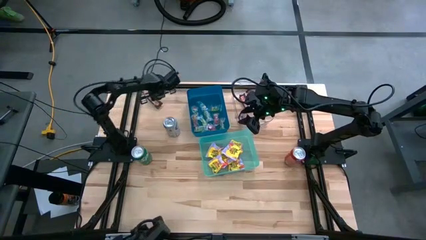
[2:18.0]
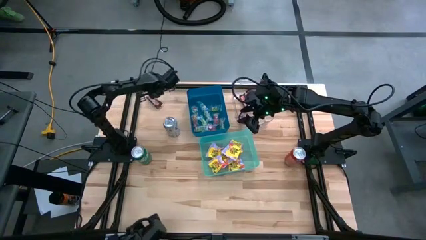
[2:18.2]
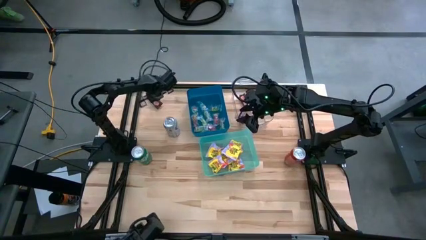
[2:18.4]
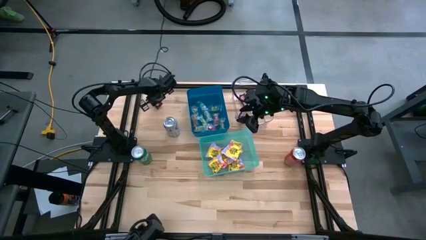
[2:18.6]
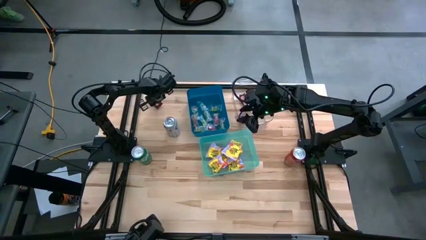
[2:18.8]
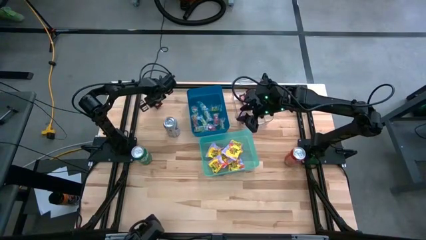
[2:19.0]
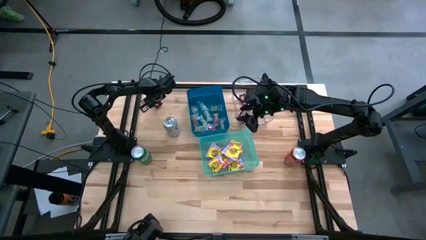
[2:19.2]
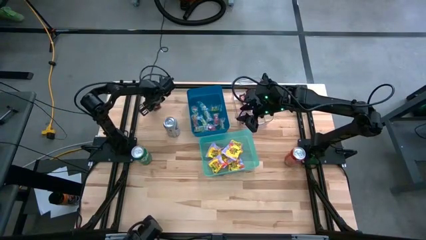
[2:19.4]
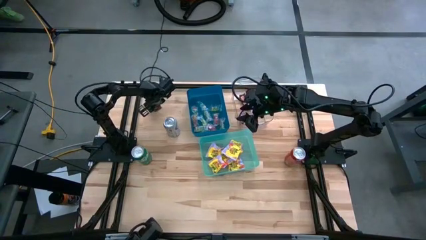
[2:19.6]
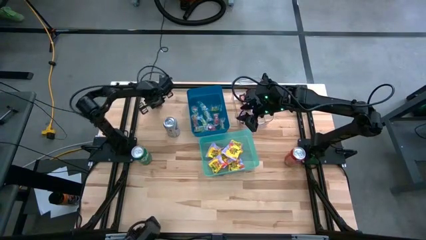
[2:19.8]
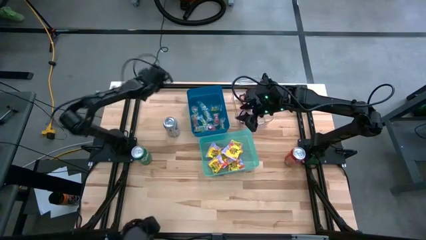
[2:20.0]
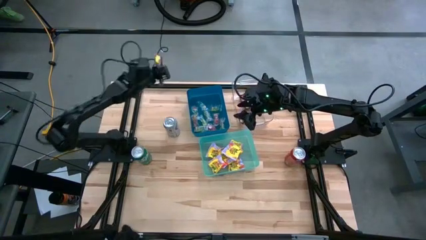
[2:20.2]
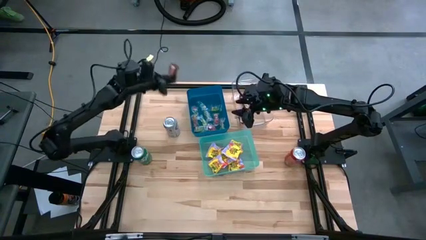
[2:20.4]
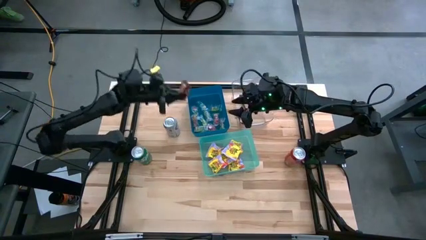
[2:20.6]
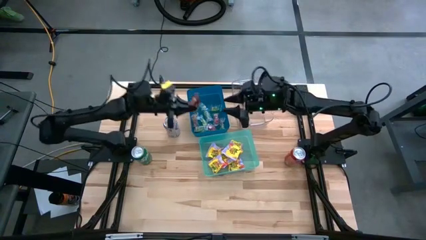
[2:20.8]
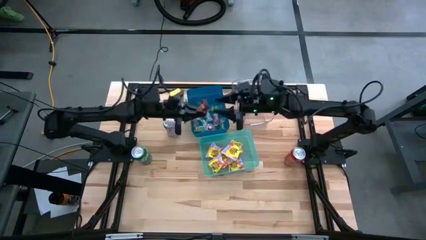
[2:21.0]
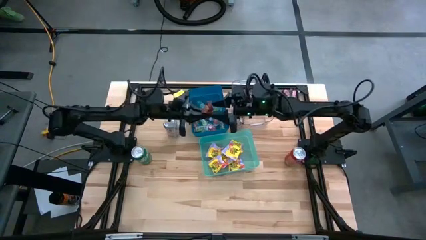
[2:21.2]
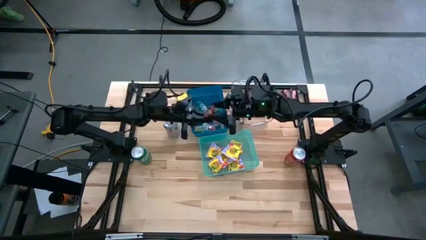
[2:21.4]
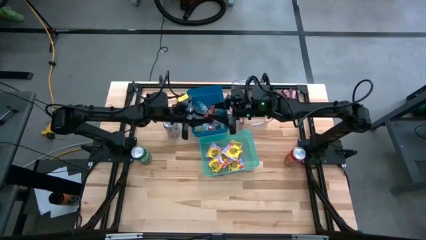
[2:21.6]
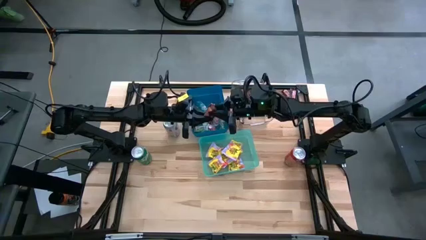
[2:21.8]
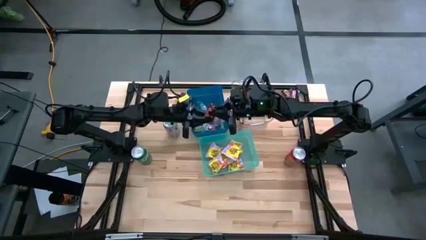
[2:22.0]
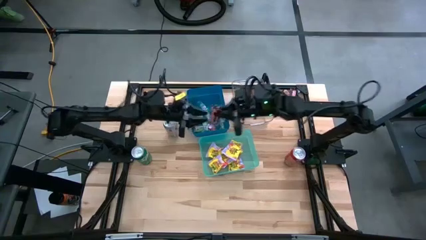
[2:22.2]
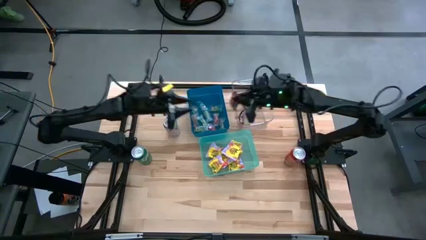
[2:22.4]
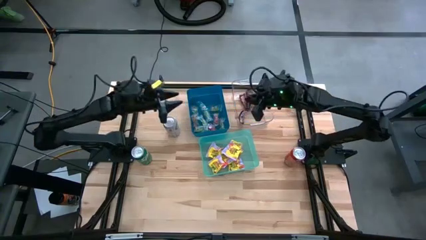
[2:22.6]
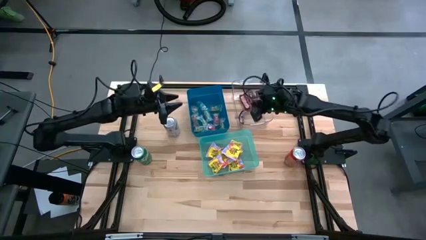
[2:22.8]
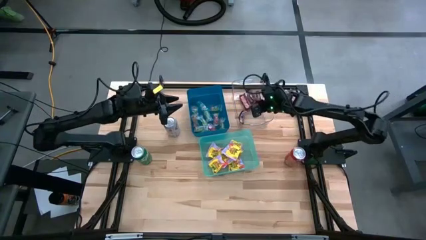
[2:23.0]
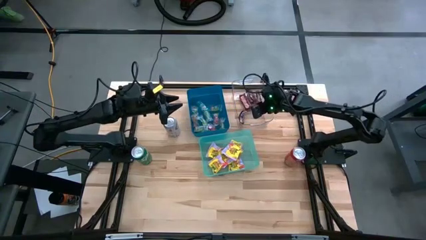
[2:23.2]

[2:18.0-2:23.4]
Task: Sort candy
Put the brown candy into the transparent bin

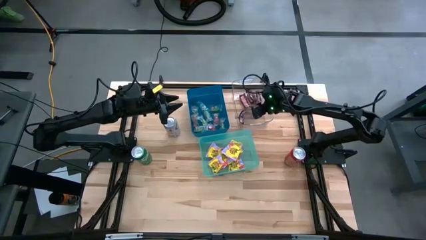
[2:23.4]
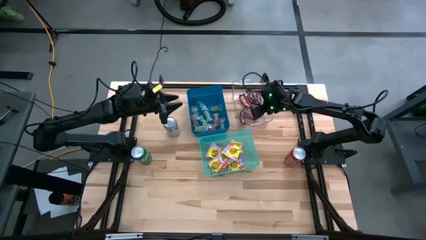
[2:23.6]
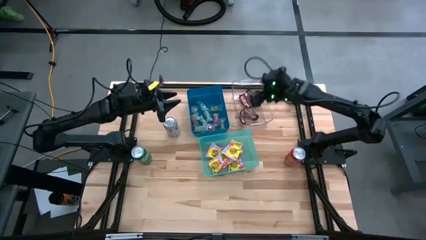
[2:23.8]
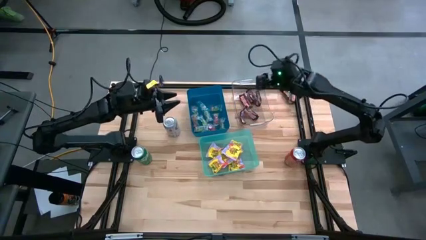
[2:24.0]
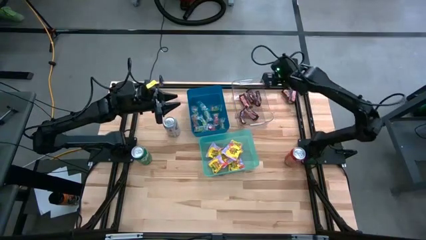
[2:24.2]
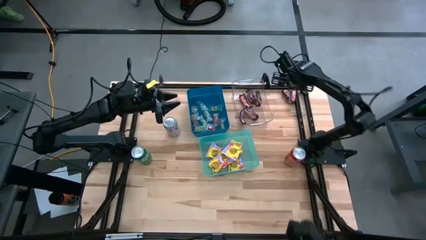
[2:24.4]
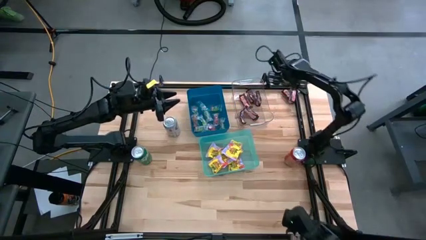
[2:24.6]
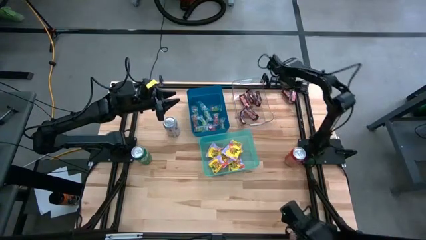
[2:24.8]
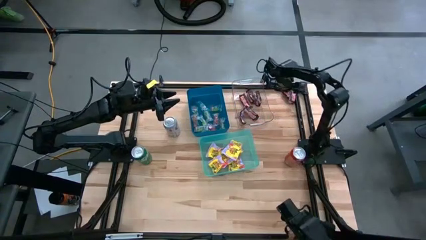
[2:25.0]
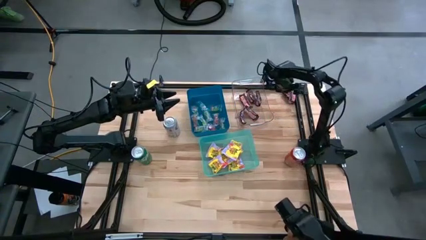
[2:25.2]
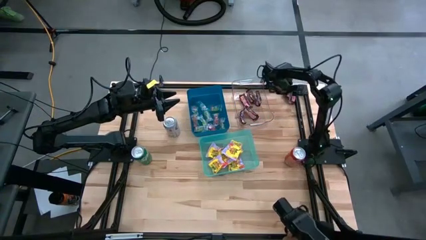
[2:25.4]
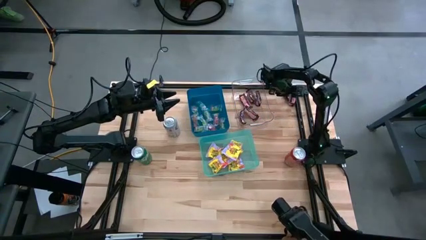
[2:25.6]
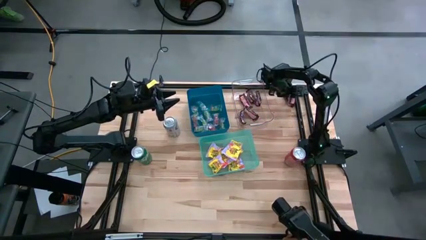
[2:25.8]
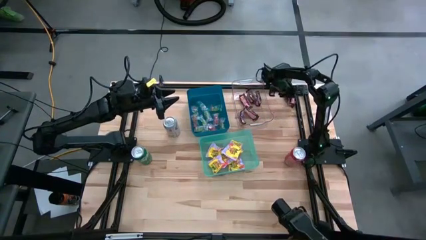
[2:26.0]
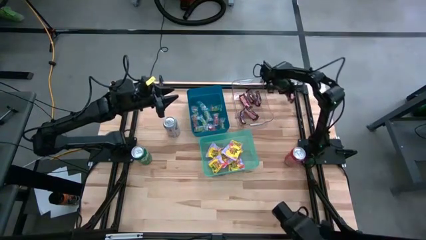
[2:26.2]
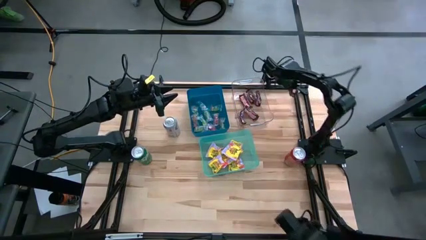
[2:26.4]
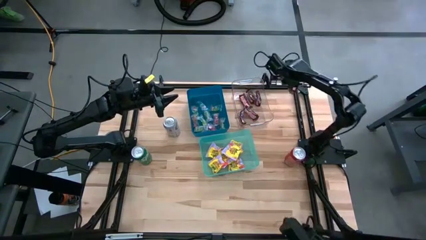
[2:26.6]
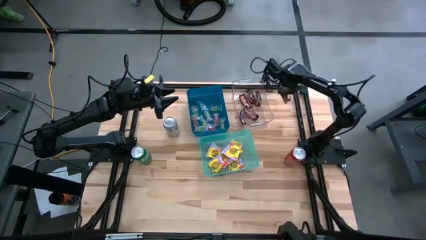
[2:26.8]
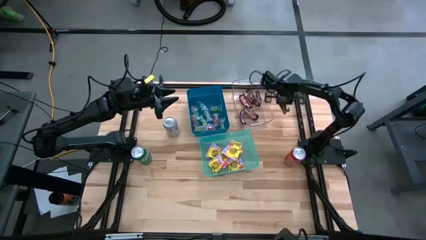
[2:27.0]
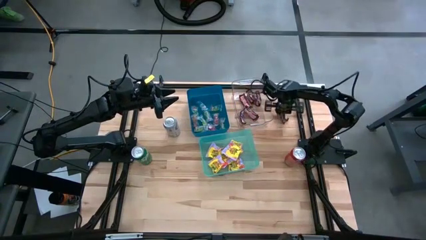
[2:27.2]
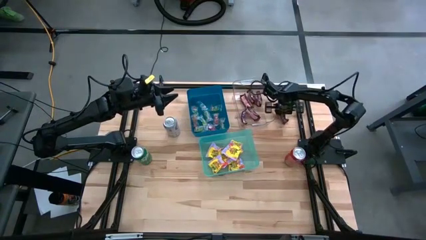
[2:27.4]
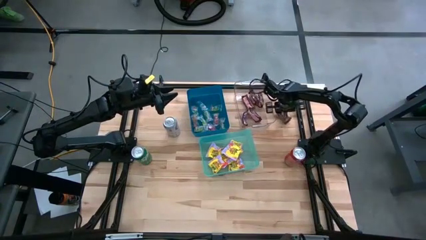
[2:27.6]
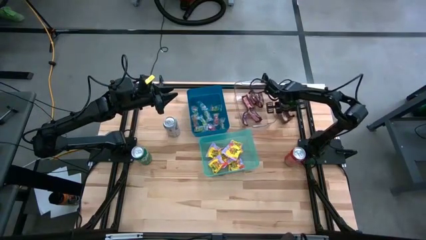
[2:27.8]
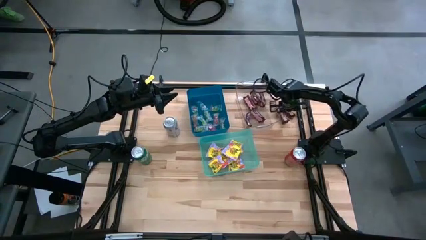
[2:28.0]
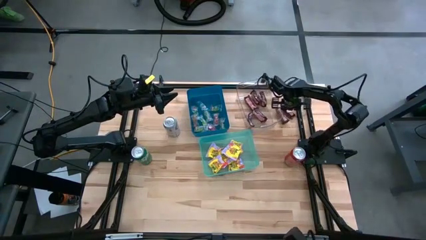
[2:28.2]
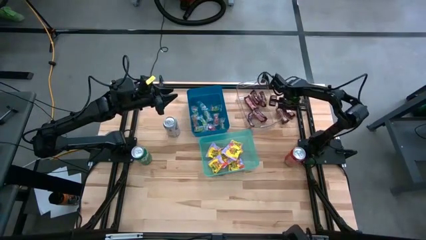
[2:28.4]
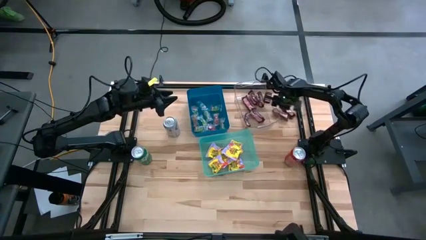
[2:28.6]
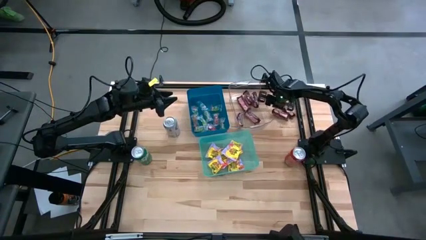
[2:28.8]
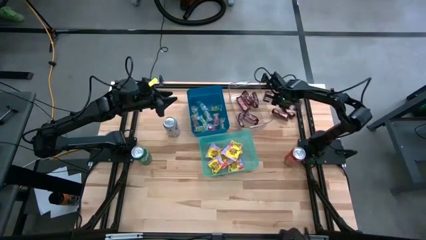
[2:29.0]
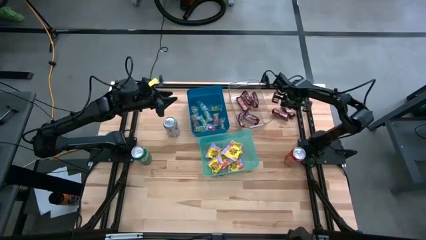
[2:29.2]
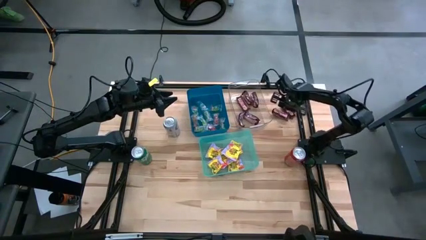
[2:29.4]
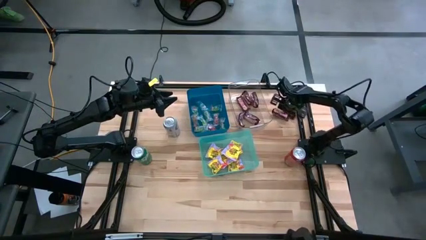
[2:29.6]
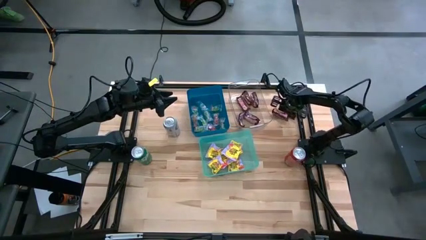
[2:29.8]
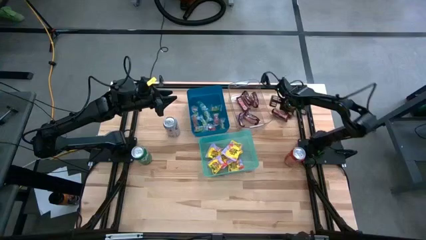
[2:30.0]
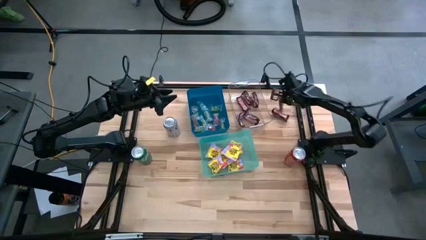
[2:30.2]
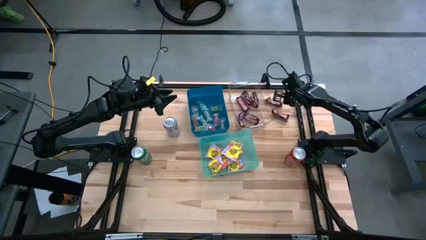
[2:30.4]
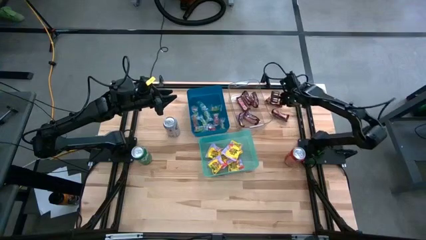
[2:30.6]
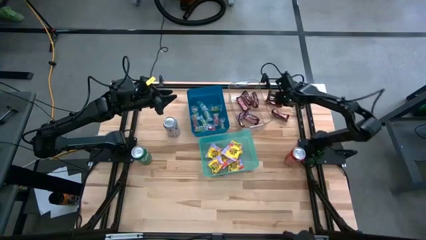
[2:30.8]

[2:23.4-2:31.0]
Put the brown candy into the transparent bin

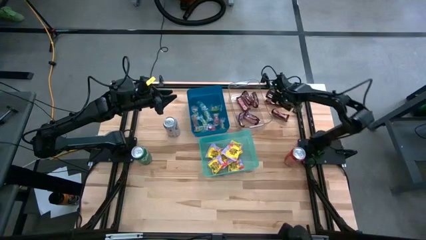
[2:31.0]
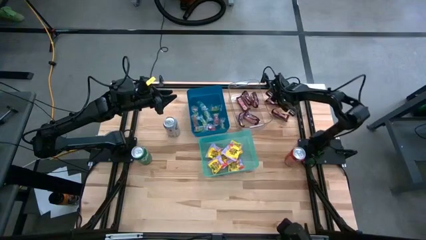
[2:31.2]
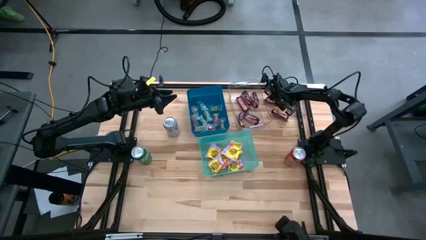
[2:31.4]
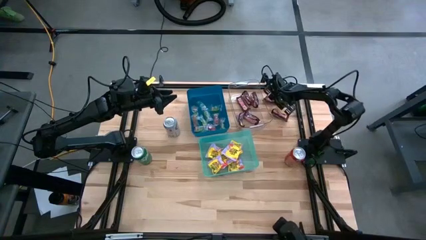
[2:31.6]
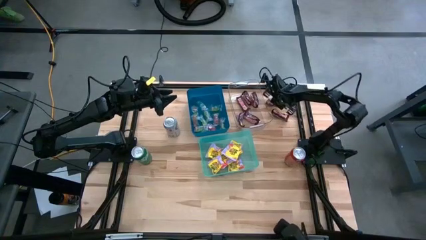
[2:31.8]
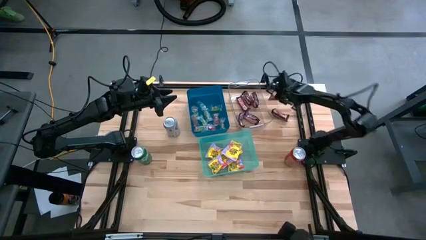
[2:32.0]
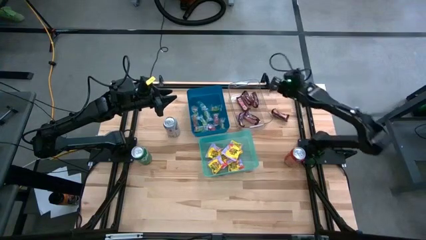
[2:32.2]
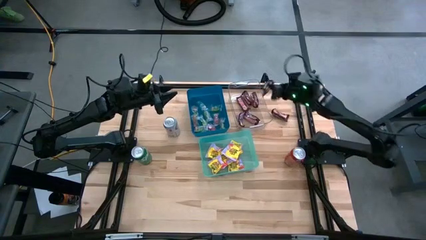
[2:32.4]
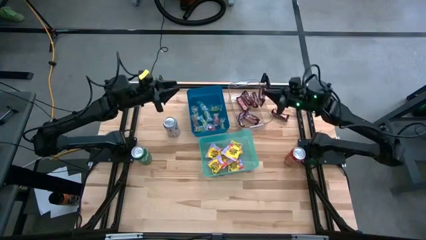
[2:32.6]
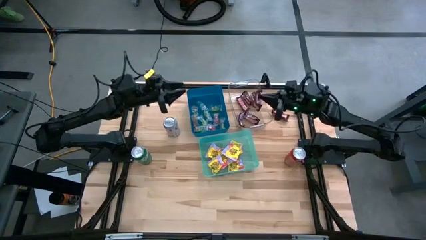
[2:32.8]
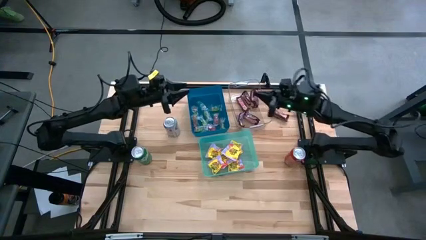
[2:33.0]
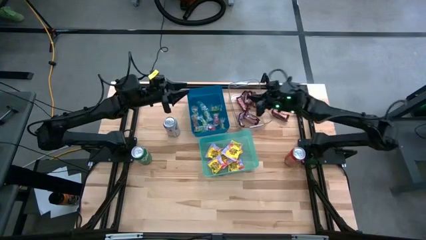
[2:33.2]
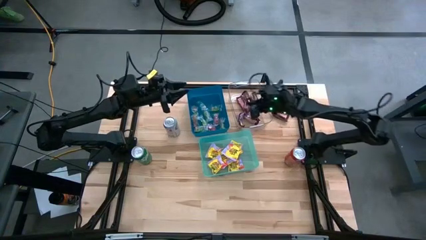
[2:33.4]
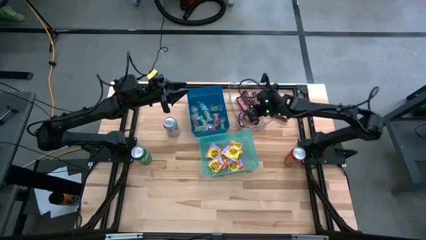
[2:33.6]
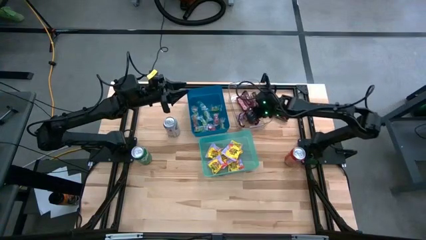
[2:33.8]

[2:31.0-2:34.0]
Put the brown candy into the transparent bin
